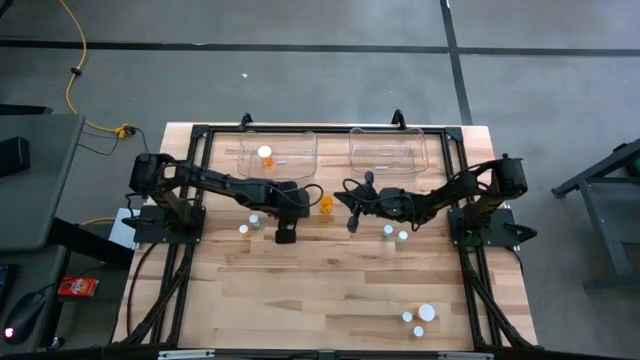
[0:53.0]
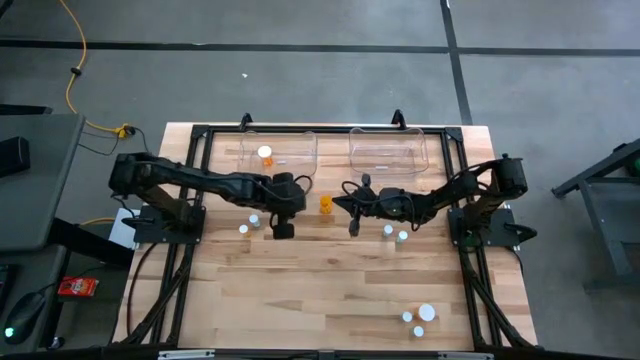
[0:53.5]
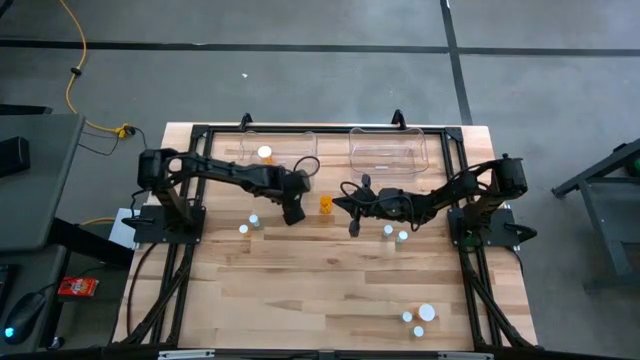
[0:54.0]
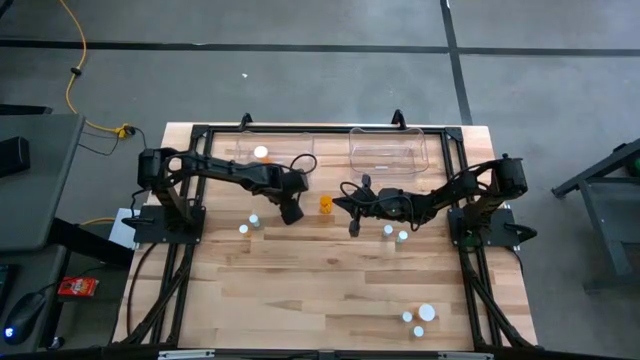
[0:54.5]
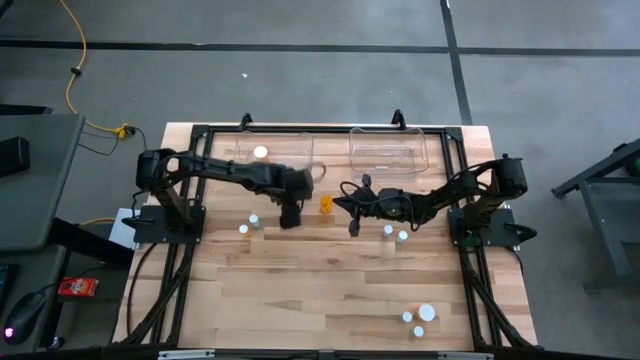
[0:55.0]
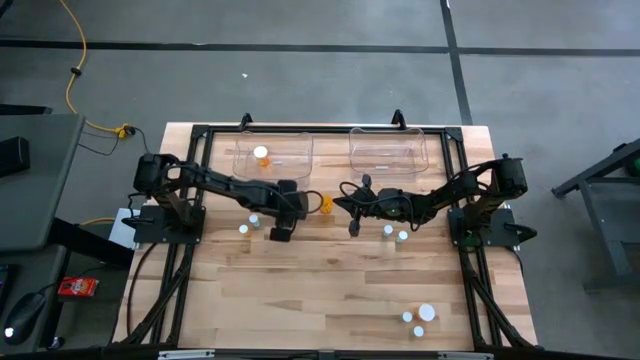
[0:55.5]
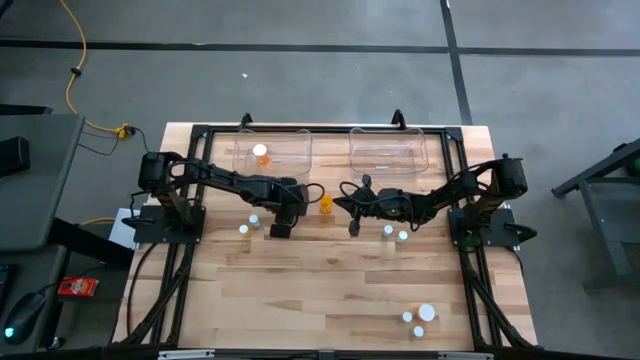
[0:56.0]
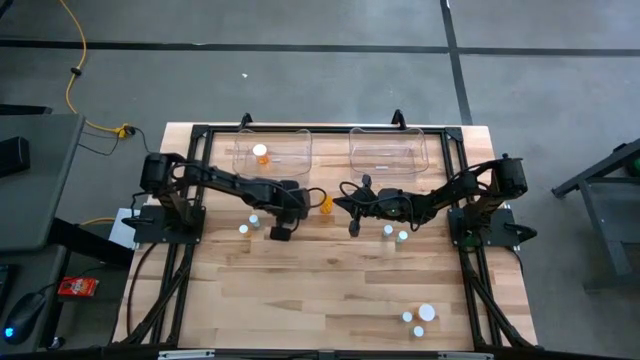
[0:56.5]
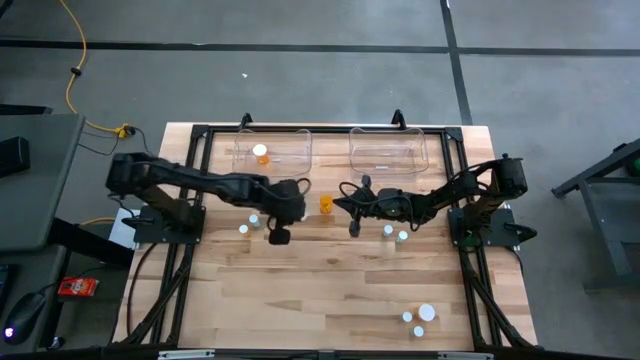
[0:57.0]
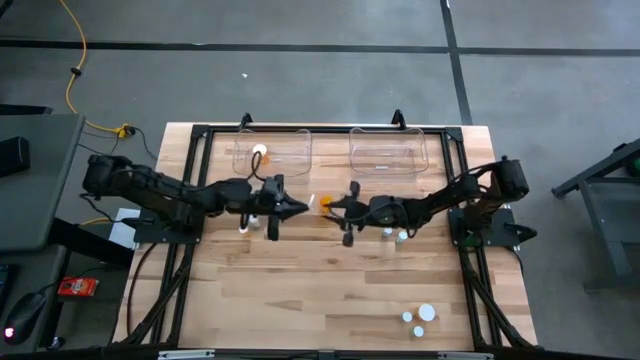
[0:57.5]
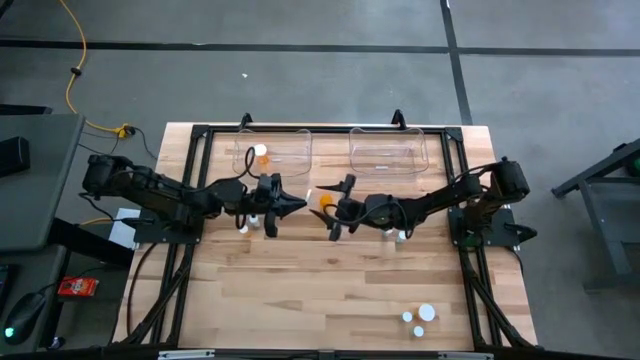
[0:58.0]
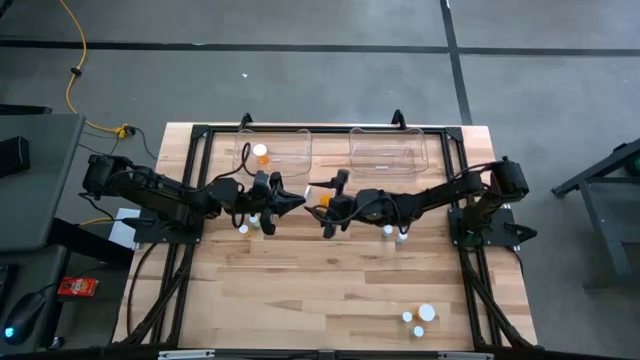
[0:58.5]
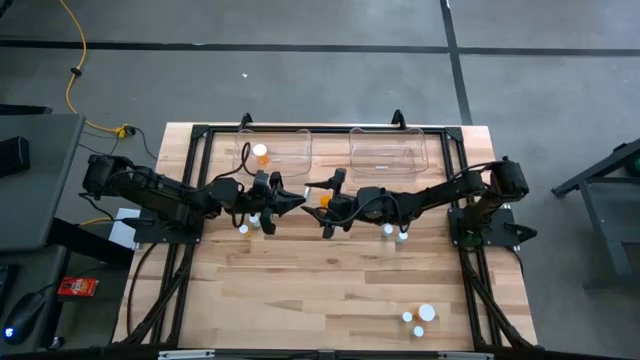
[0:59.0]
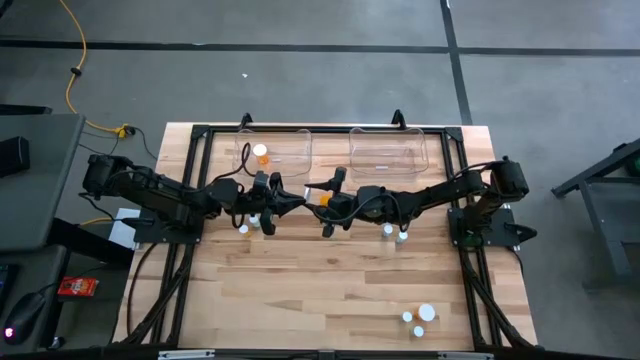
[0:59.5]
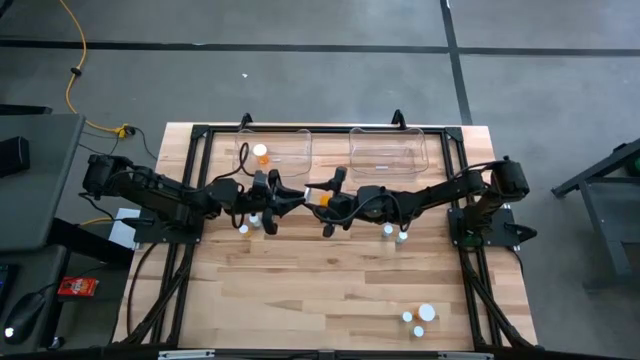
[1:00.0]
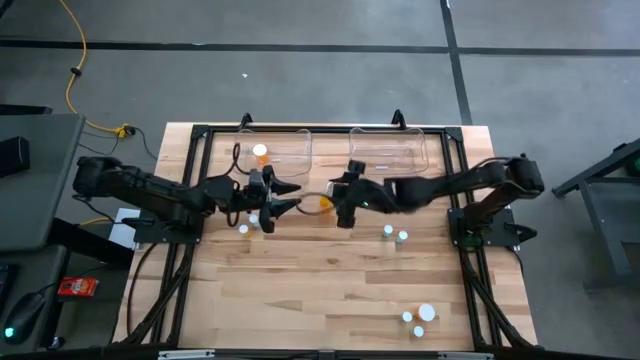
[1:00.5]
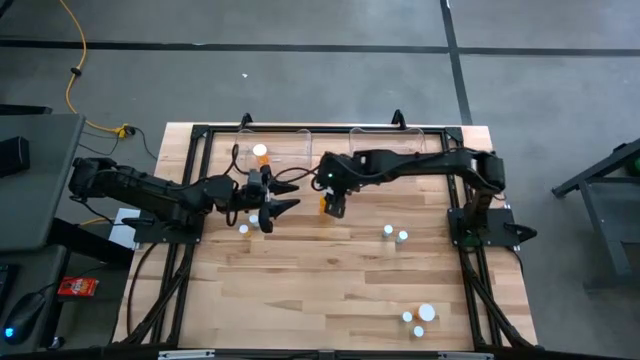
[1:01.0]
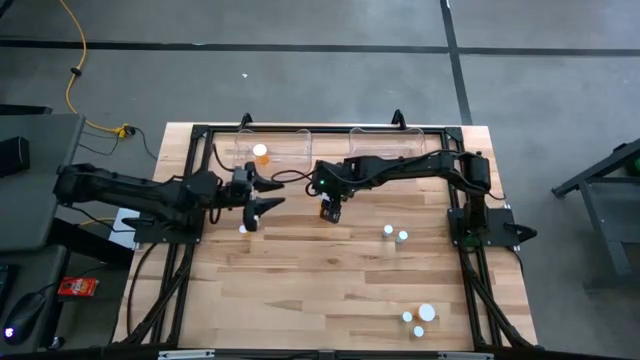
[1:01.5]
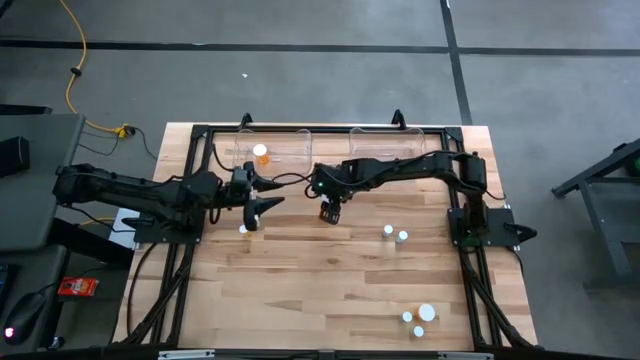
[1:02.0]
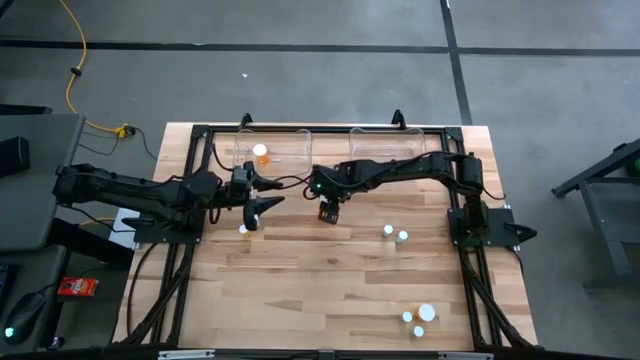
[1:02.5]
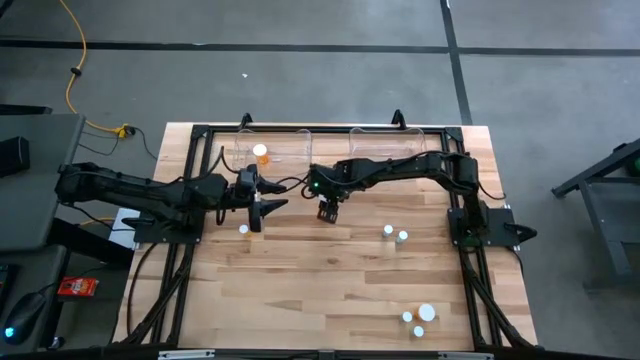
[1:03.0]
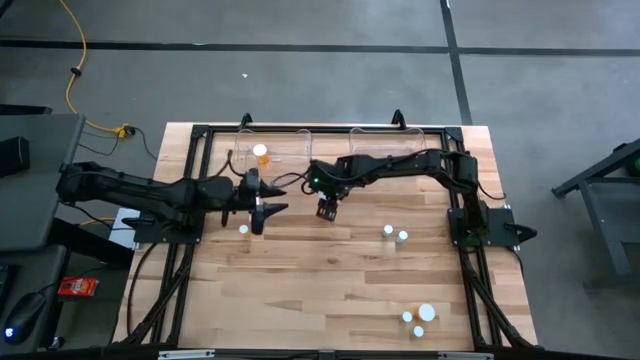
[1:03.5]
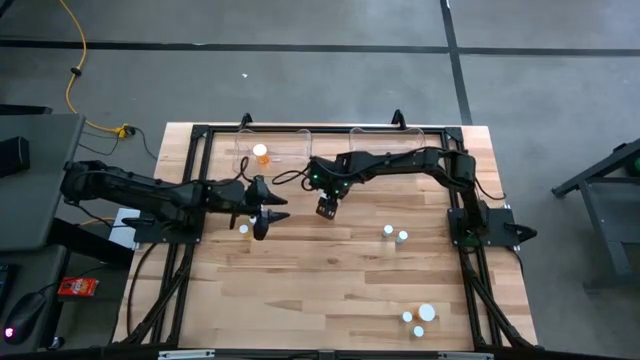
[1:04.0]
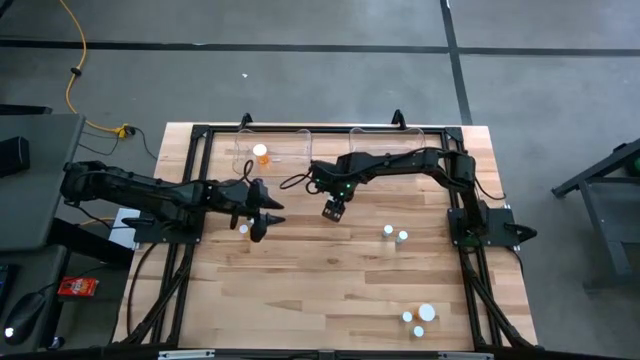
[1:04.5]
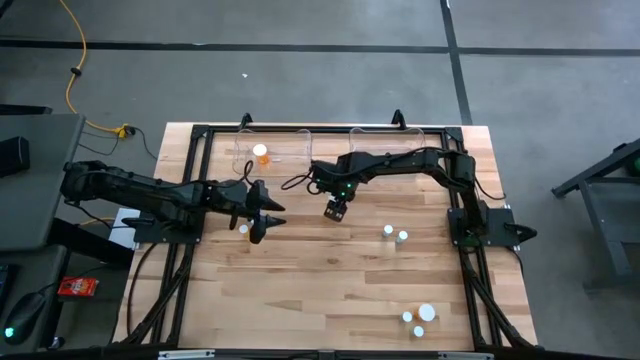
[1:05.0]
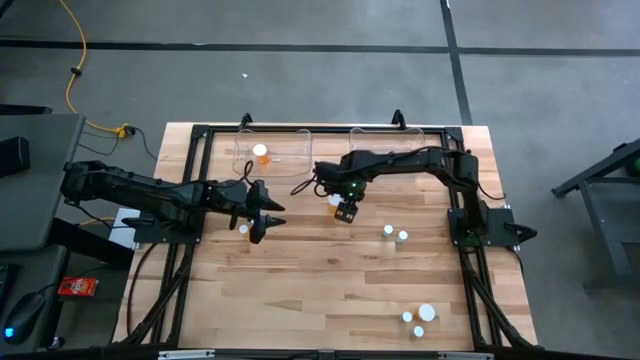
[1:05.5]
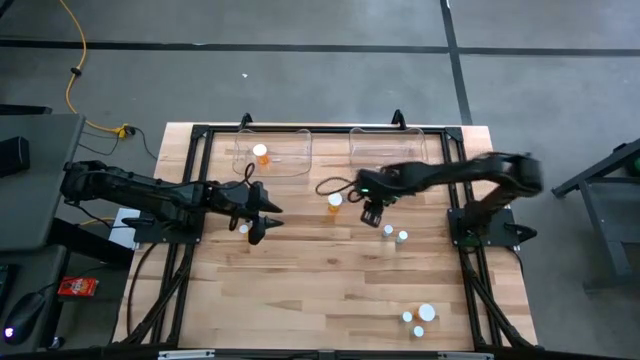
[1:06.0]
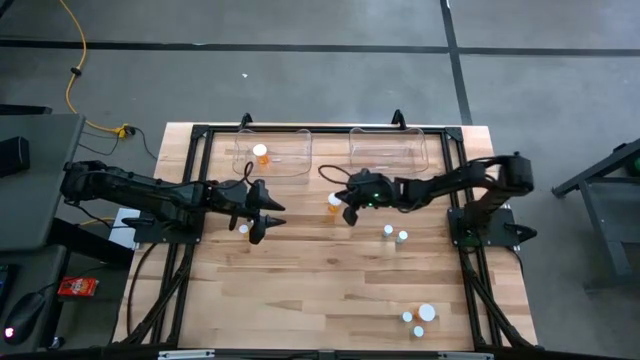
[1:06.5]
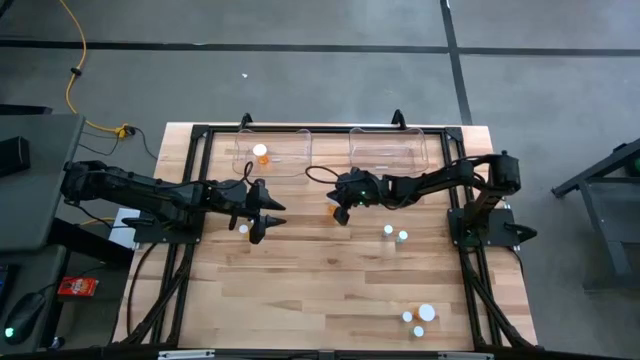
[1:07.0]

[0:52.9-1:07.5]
Task: Pick and place medicine bottles into bin by pill shape (circle, oval)
Put the top orange capsule bottle into the left transparent bin

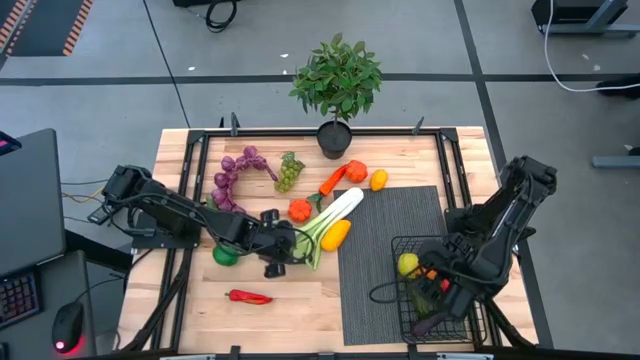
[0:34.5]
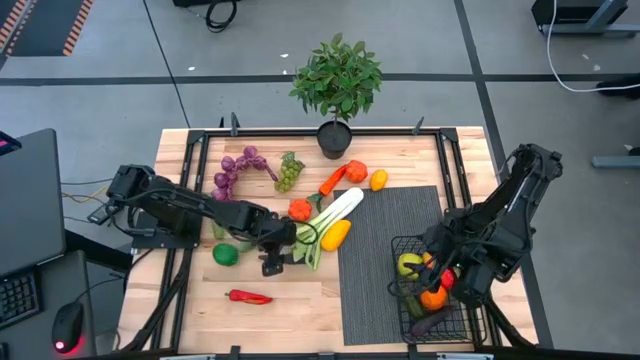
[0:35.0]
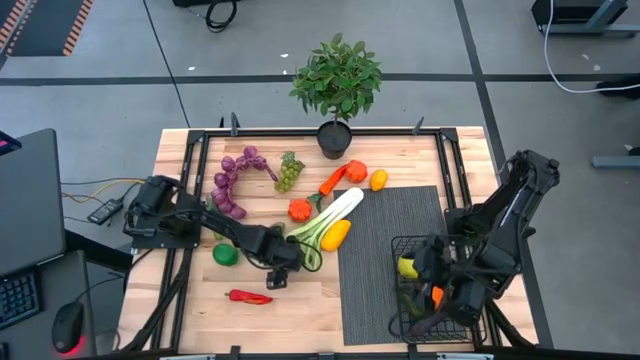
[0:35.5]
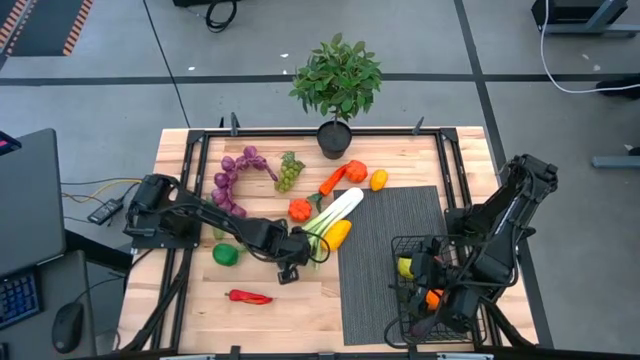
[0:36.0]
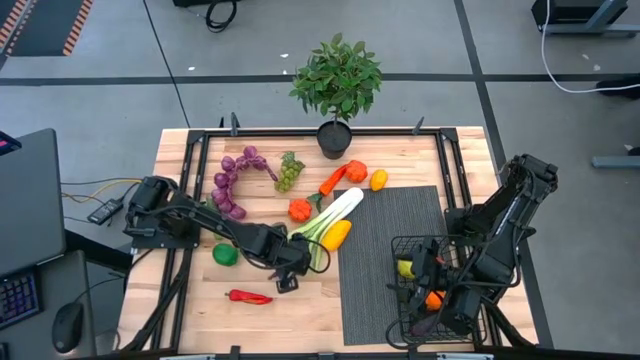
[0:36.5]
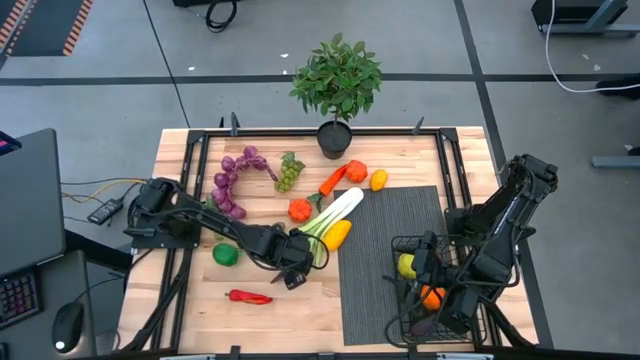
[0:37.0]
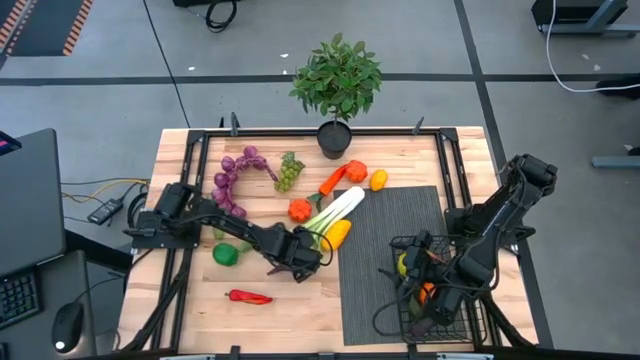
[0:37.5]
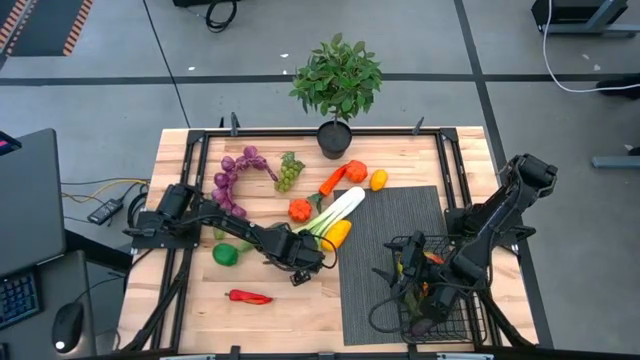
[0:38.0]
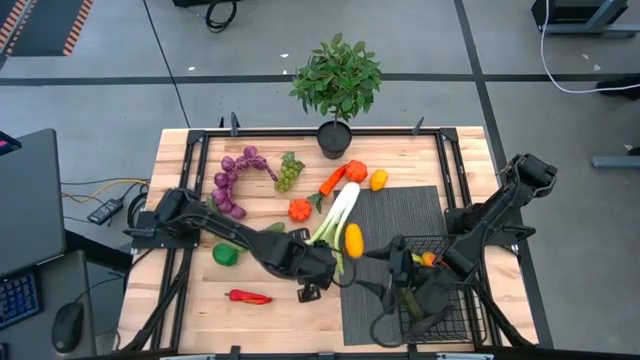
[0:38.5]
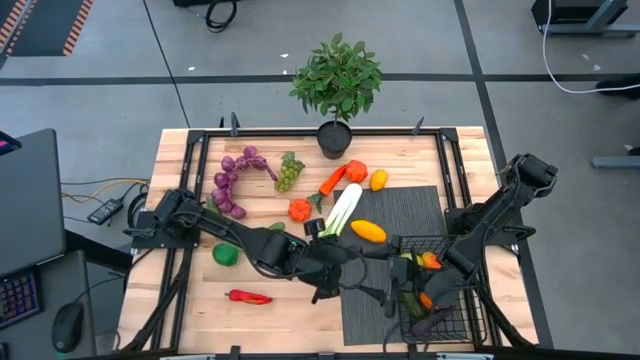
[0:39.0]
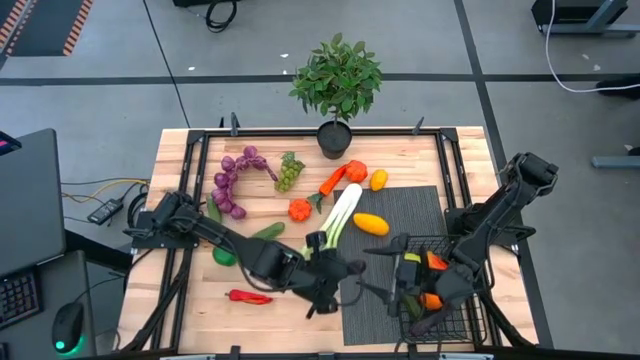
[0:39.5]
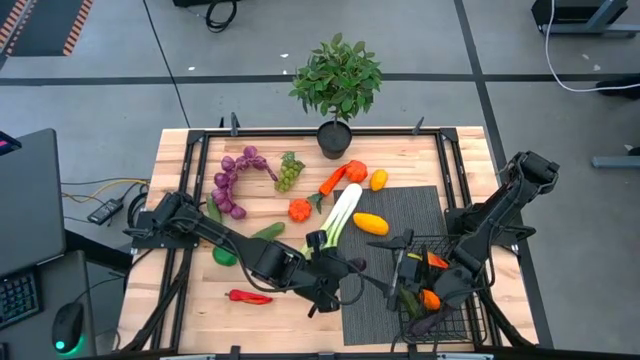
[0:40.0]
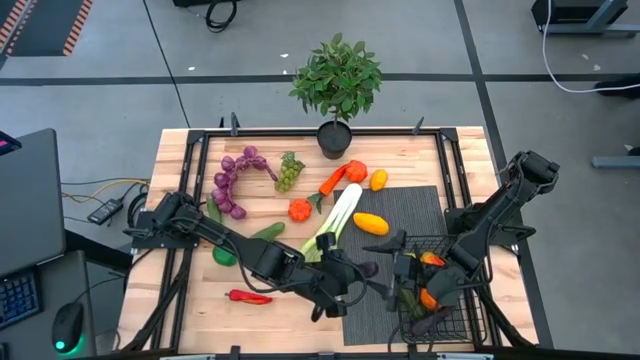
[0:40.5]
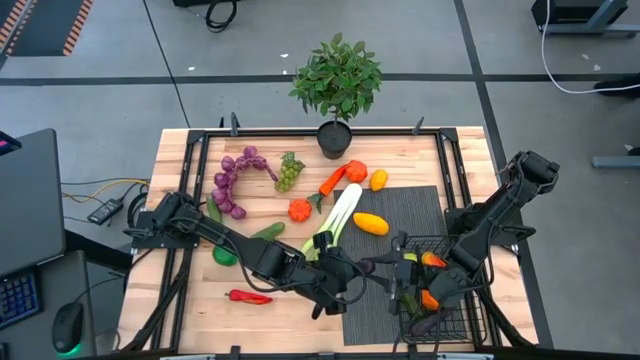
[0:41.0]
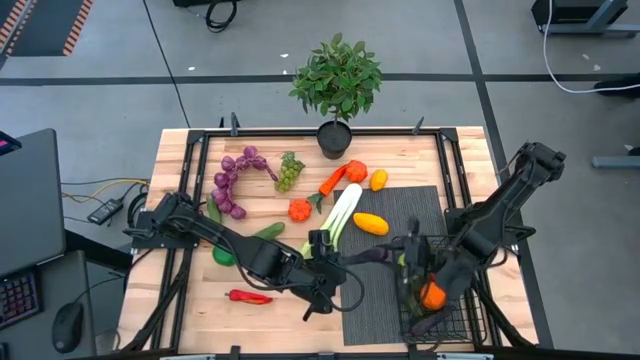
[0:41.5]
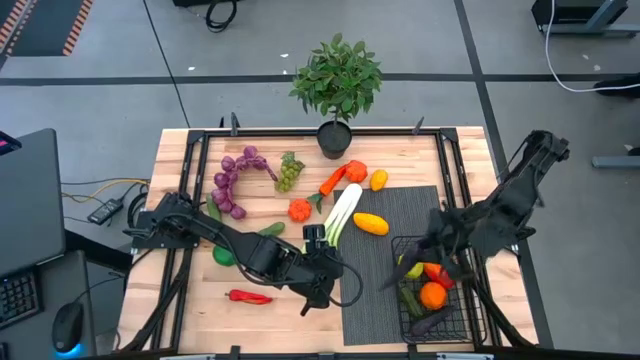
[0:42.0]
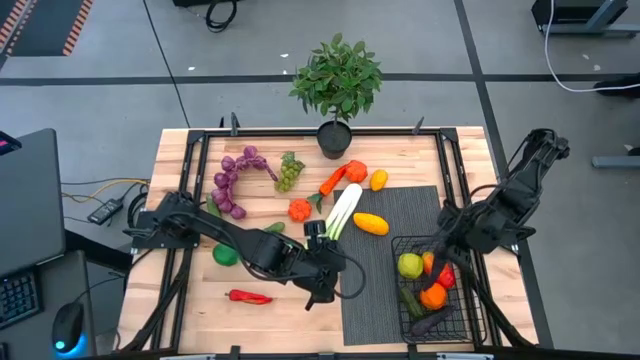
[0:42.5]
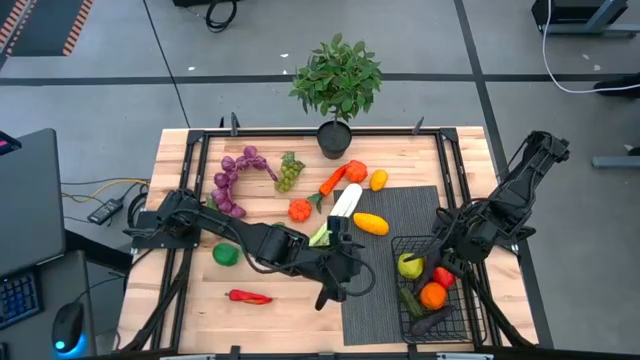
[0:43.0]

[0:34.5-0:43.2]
Task: Build produce basket
Put the eggplant into the black wire basket
